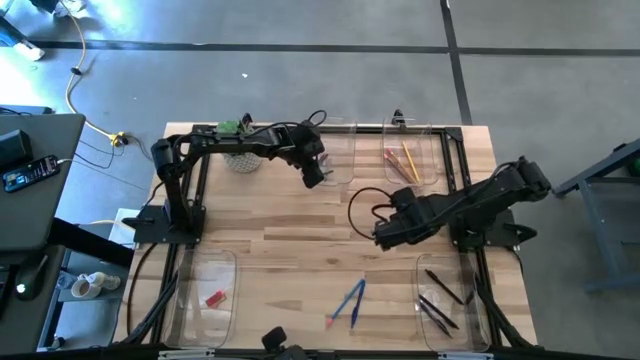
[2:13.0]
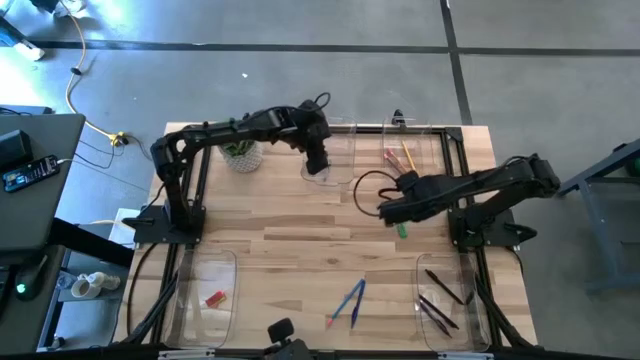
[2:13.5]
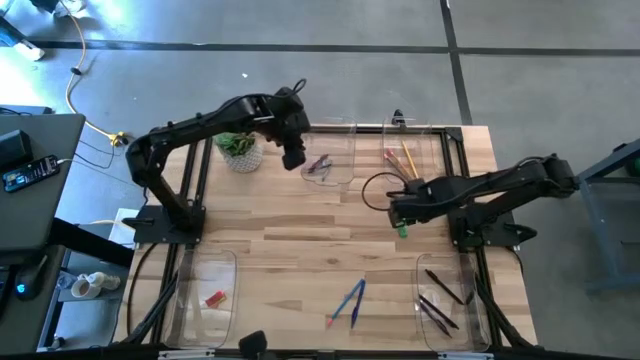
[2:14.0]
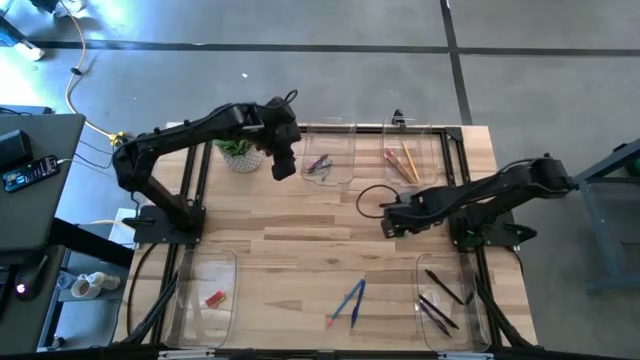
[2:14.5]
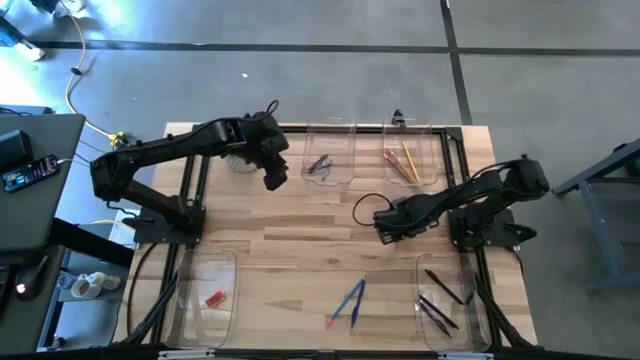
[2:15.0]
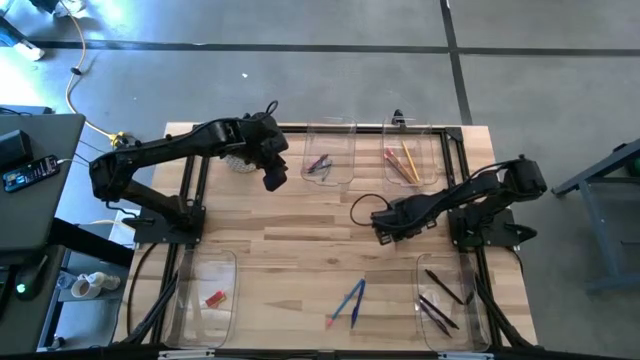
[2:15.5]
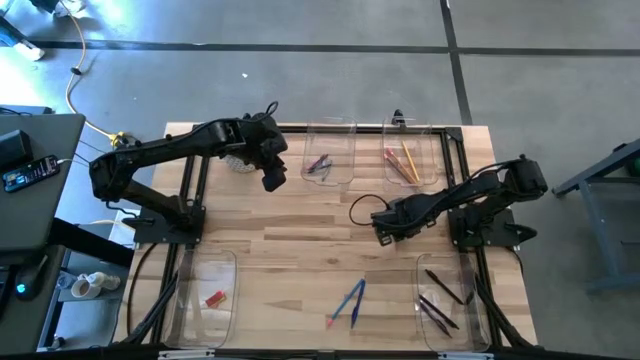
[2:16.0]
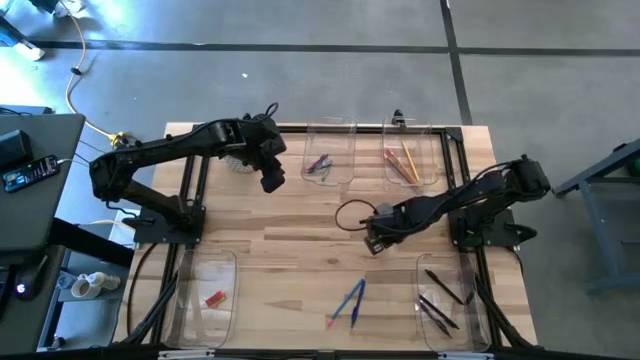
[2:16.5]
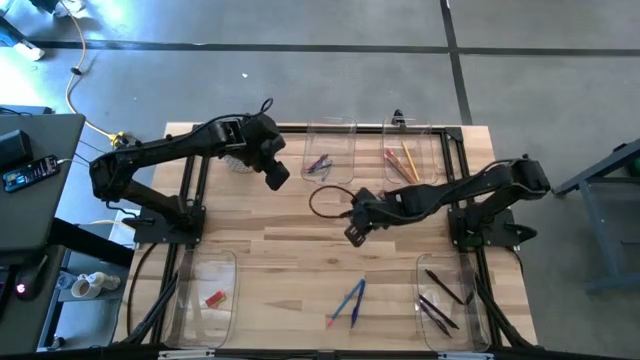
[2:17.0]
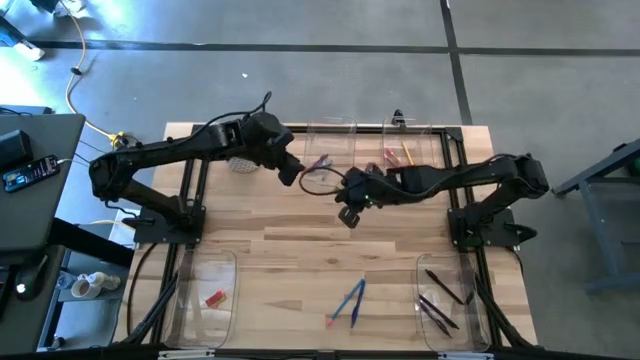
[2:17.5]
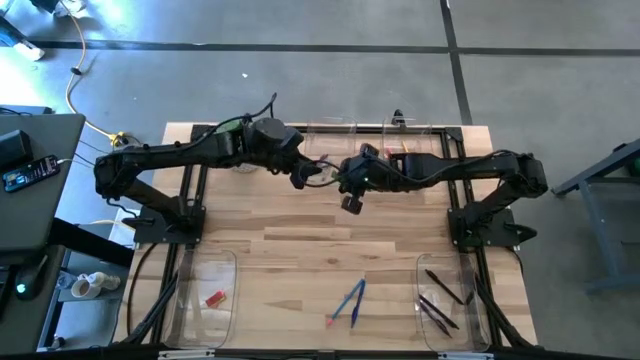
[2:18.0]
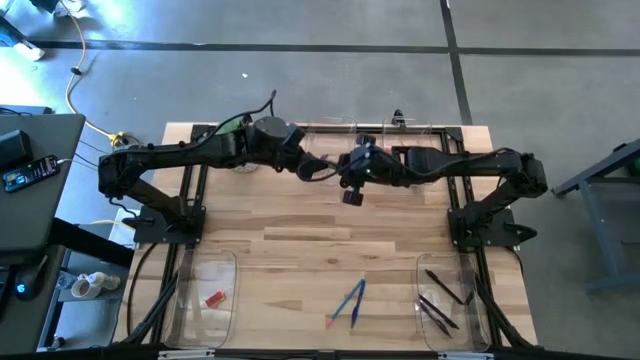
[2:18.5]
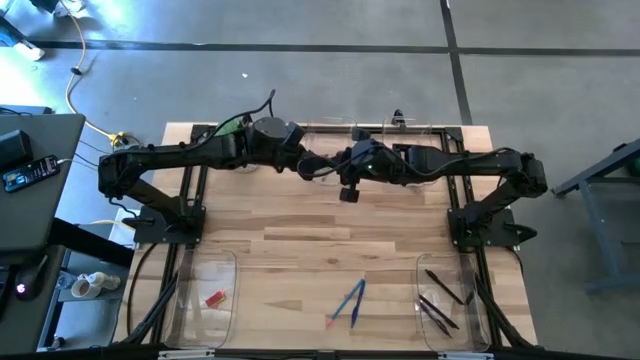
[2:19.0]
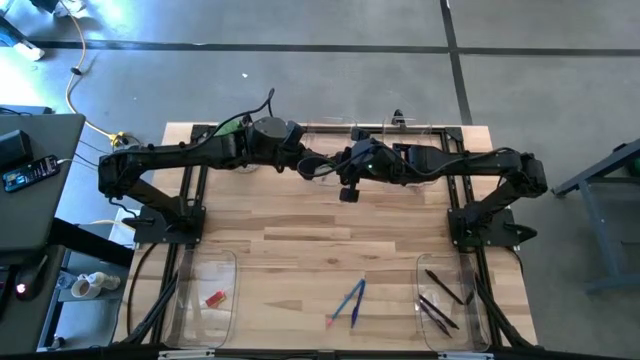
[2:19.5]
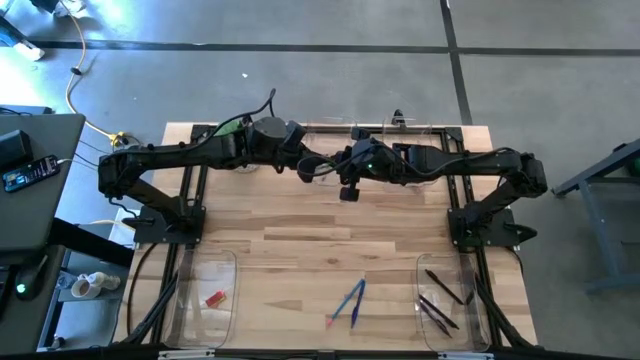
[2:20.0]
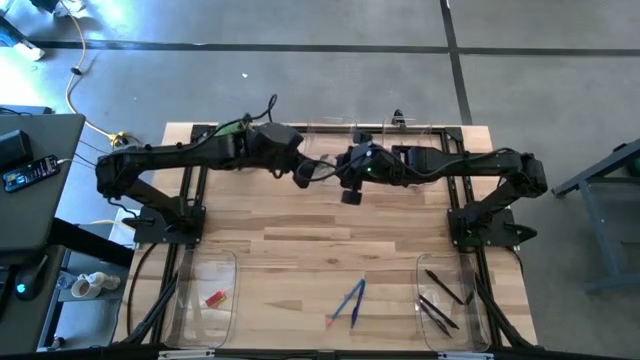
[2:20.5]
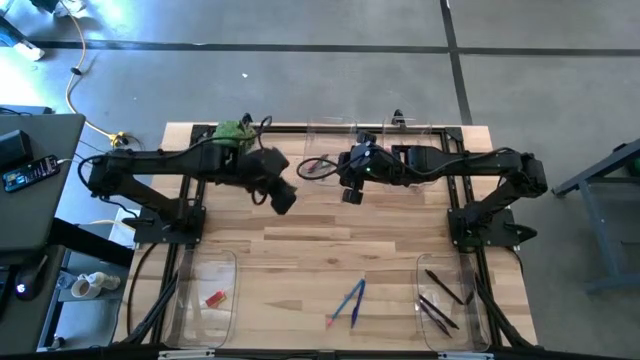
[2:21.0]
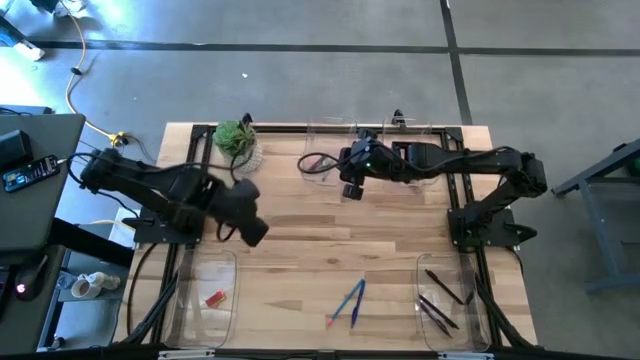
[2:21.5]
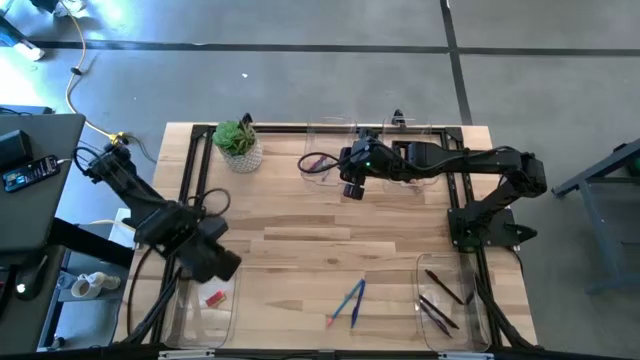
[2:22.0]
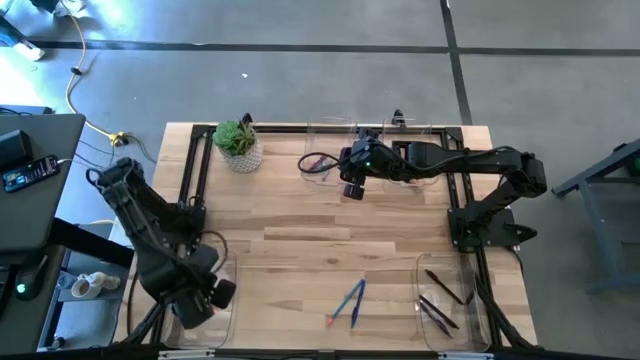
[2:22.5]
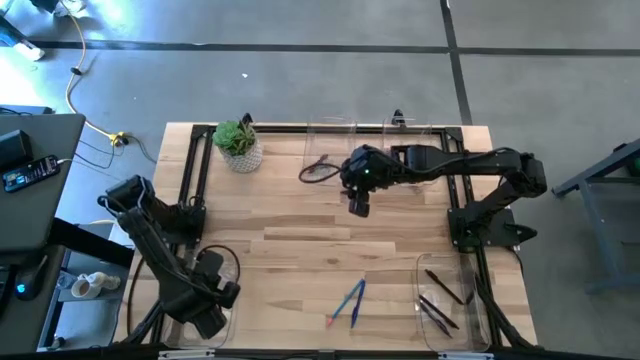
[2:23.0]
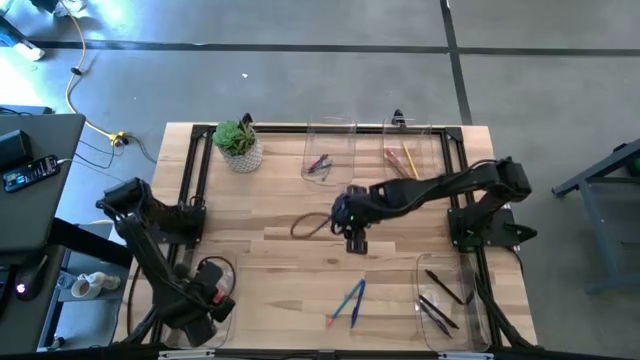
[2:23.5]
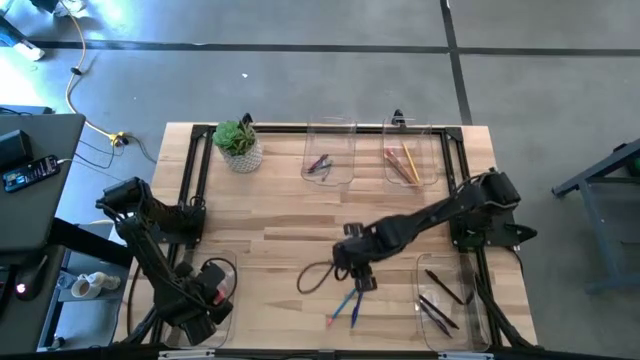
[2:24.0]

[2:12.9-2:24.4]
Task: Sort crayons/erasers/pens/pencils in bins
Put the dark green eraser into the bottom left transparent bin

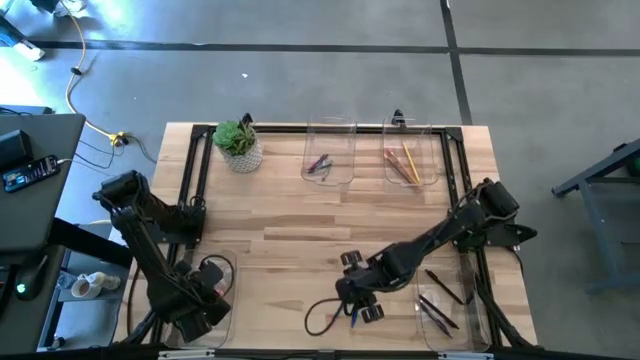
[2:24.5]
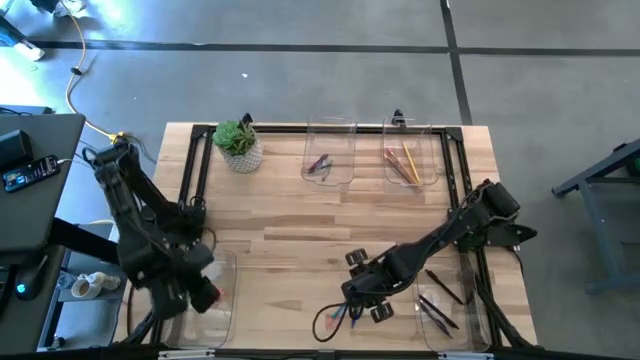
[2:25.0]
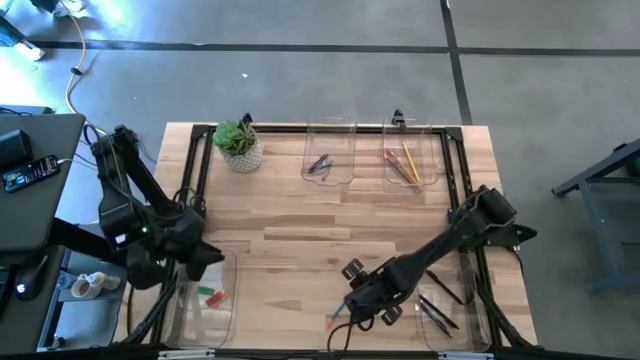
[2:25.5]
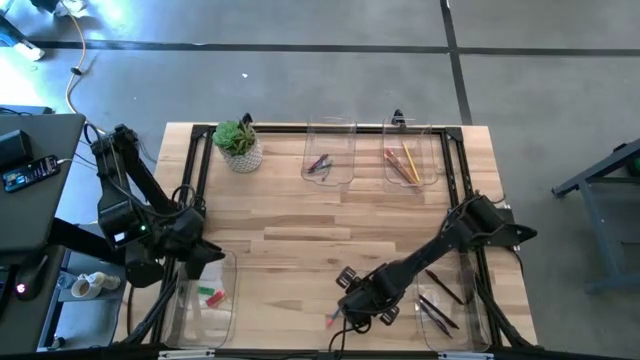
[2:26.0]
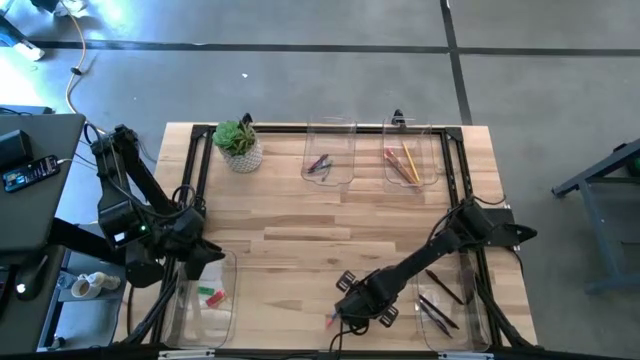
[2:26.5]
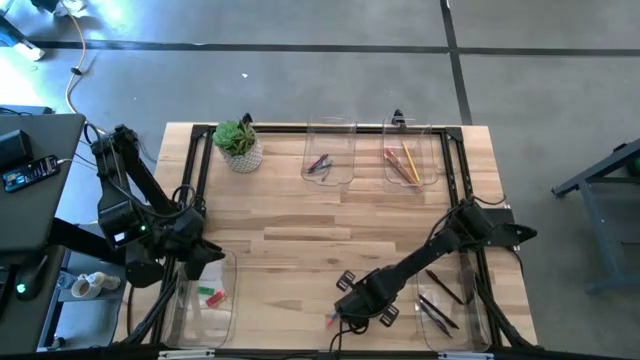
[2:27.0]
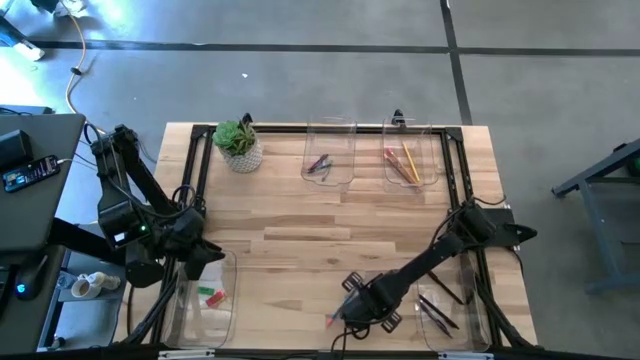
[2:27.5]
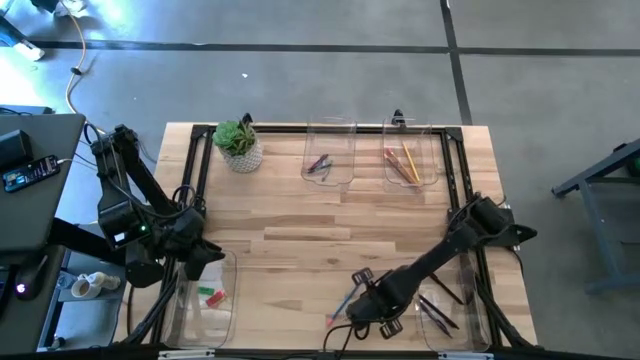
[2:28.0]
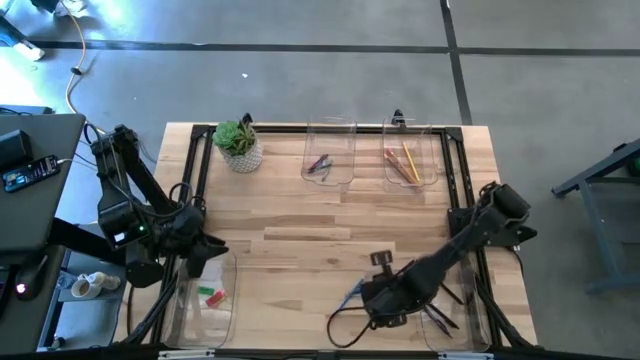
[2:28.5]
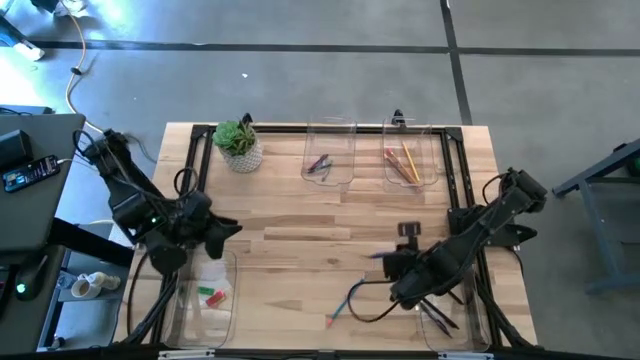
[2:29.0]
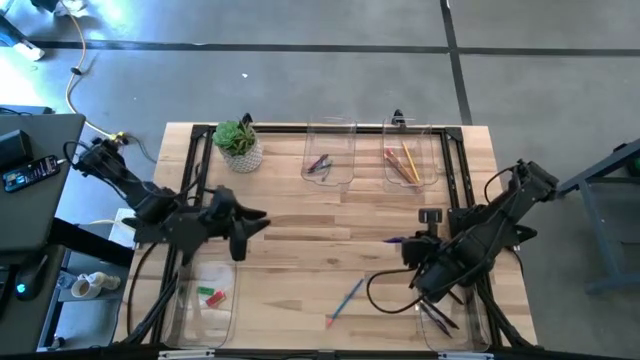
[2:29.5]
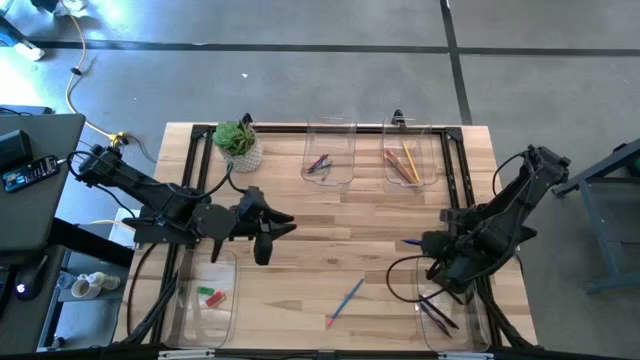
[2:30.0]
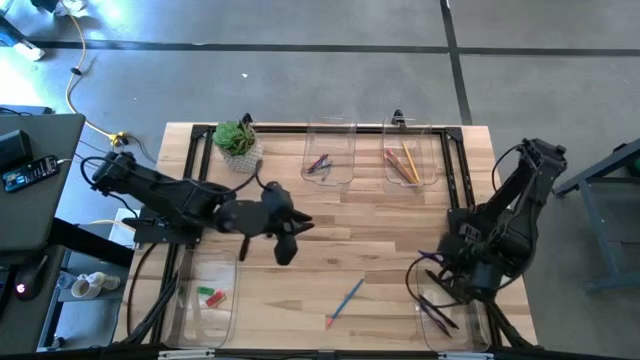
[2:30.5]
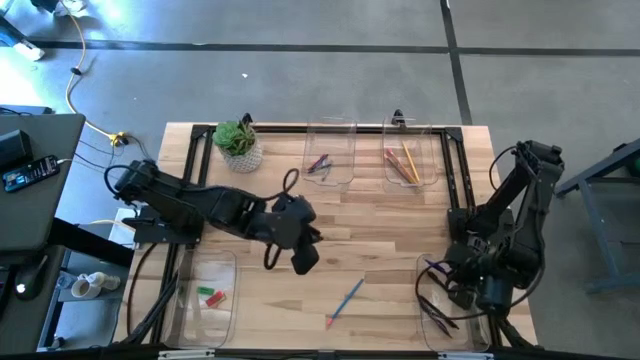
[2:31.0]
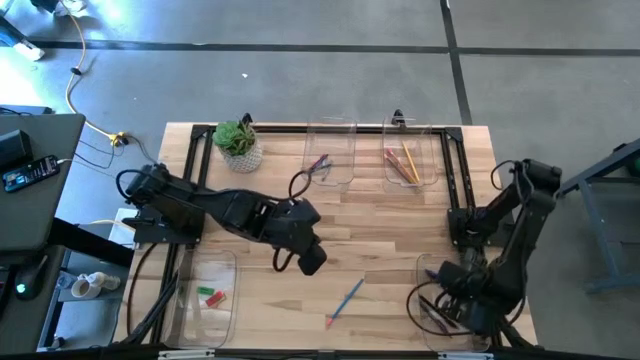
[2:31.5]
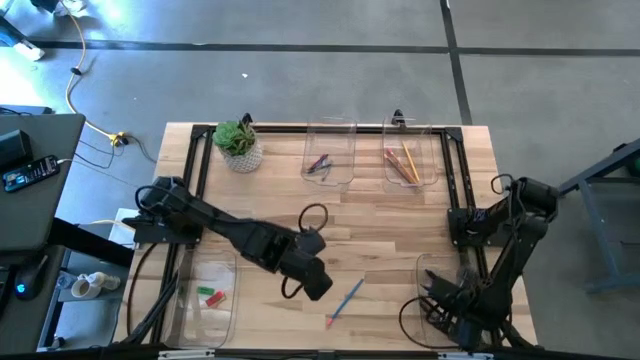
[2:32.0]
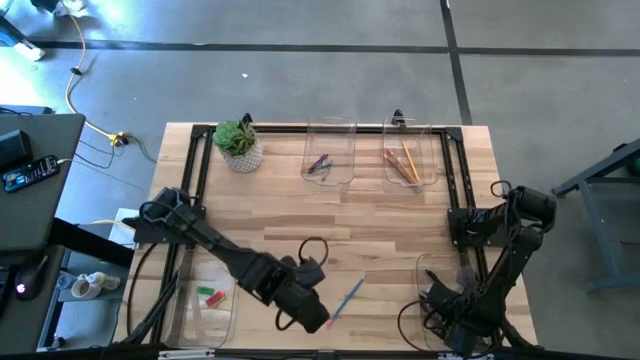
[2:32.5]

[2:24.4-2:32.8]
Put the blue pen into the bottom right transparent bin

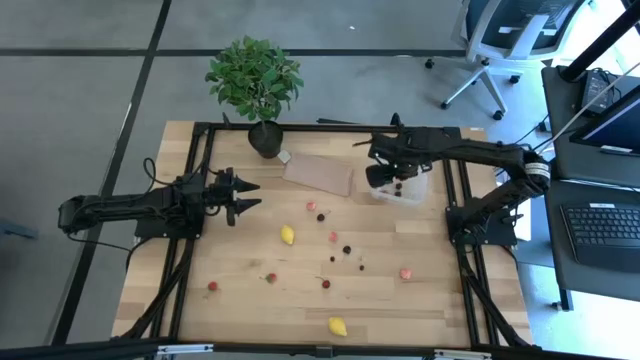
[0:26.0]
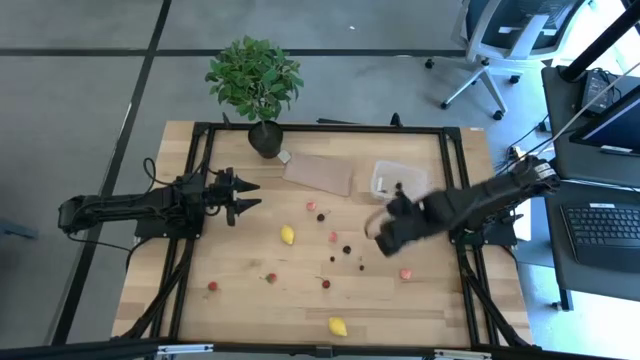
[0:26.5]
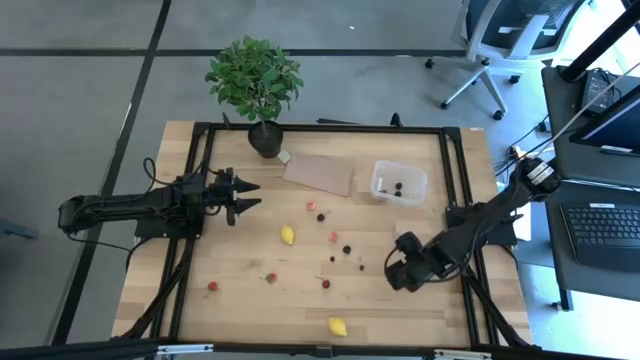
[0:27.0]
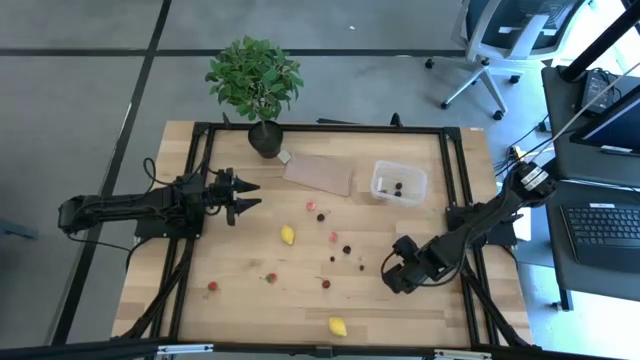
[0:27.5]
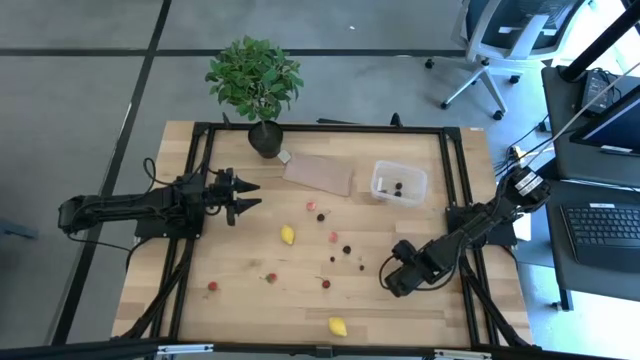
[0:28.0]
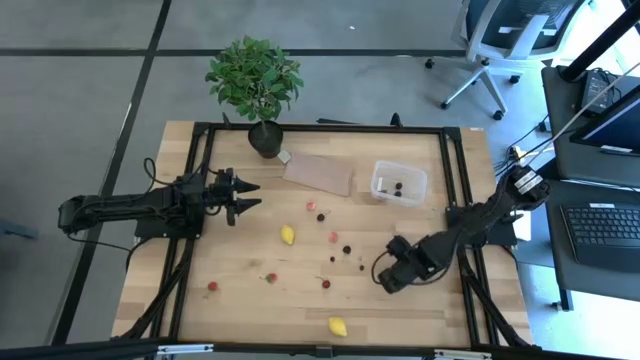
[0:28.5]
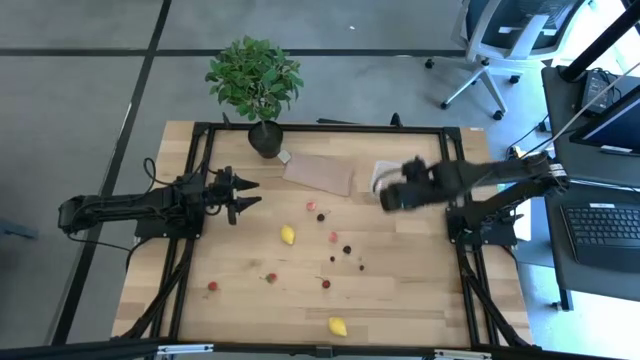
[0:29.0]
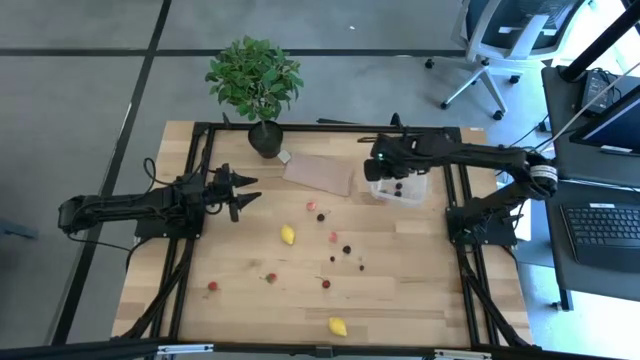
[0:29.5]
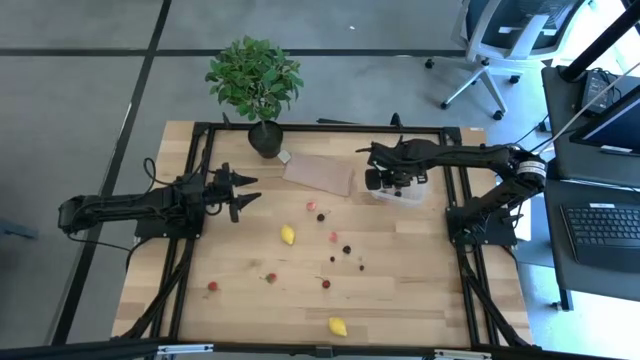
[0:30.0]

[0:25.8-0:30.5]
Task: Pick and placing Produce into tupperware
Put the bottom right pink peach into the transparent container
